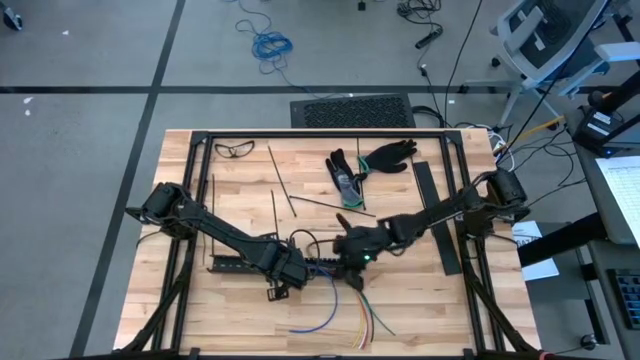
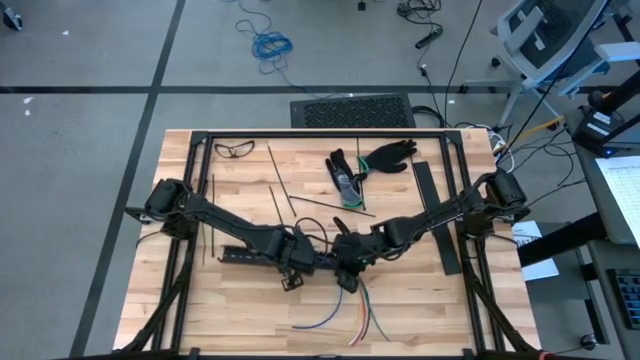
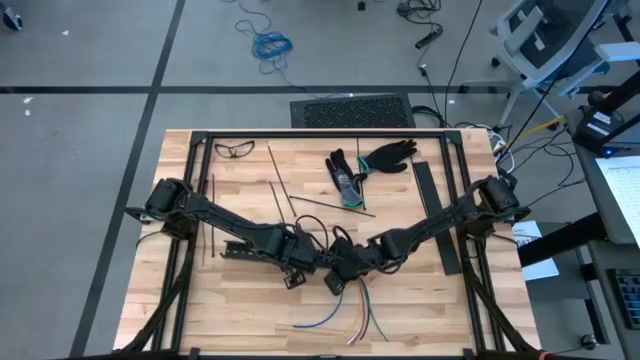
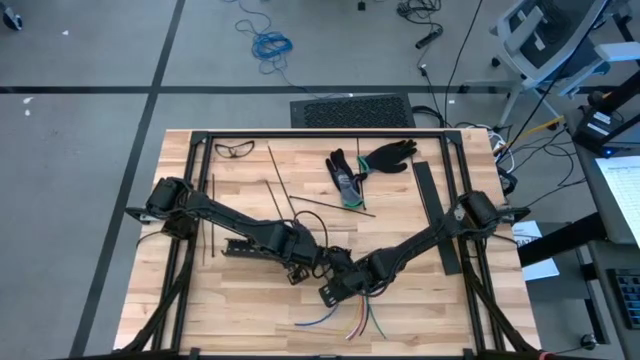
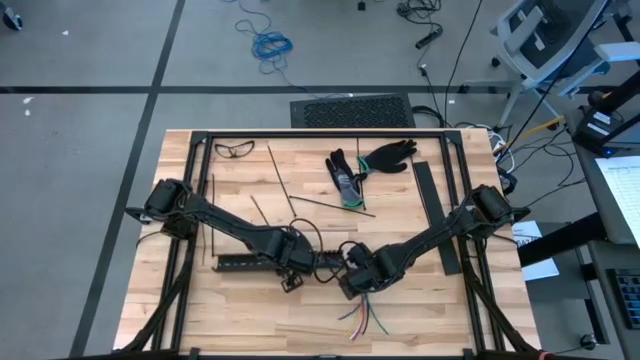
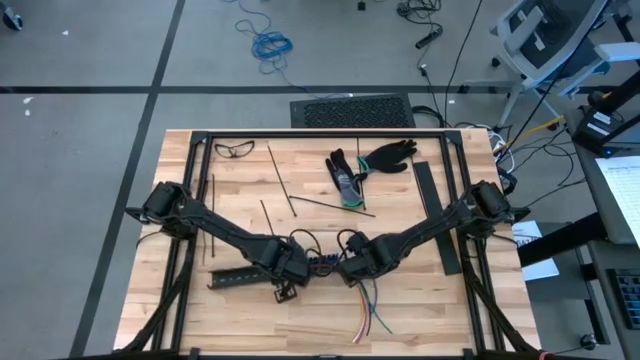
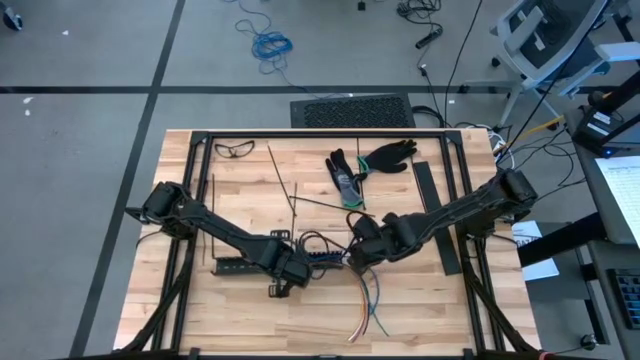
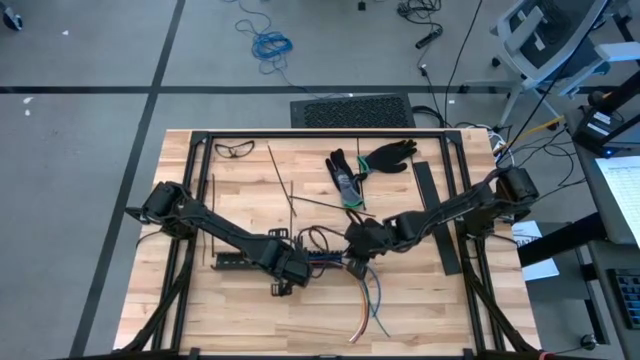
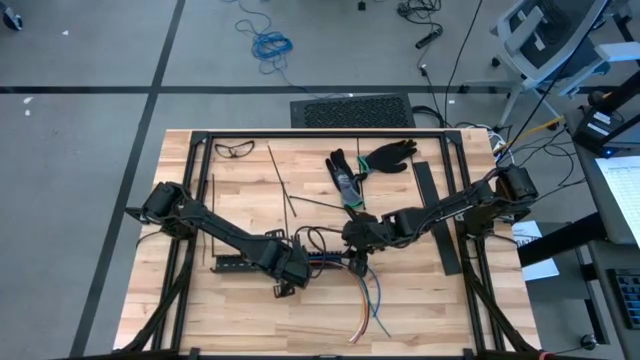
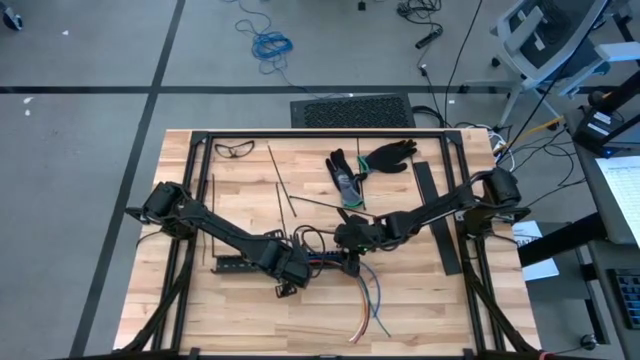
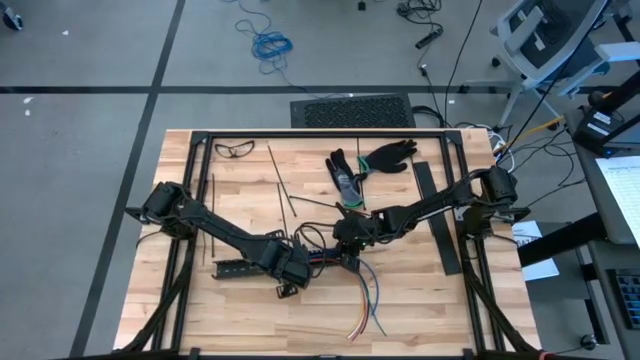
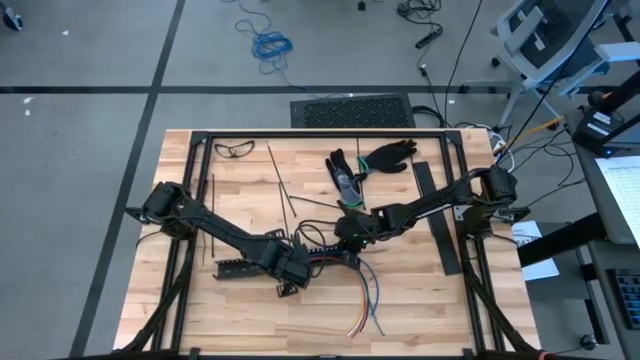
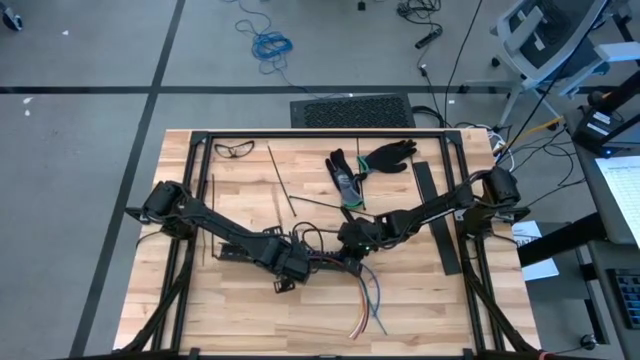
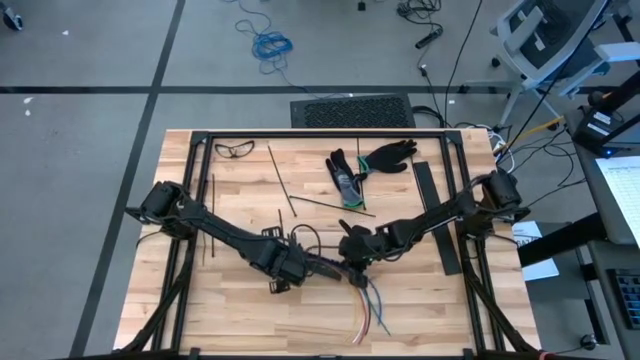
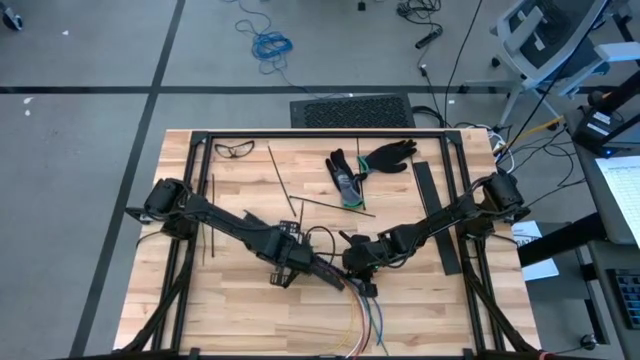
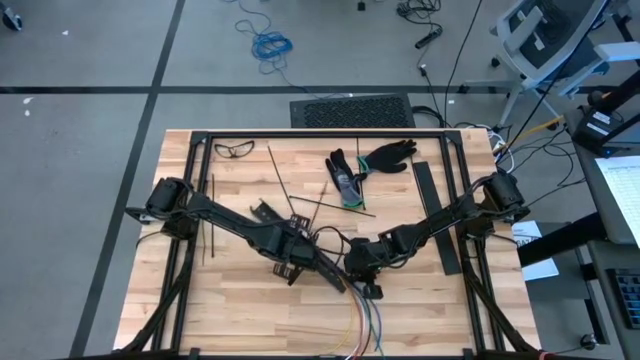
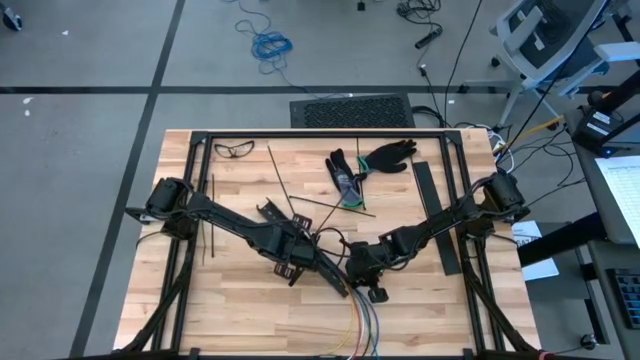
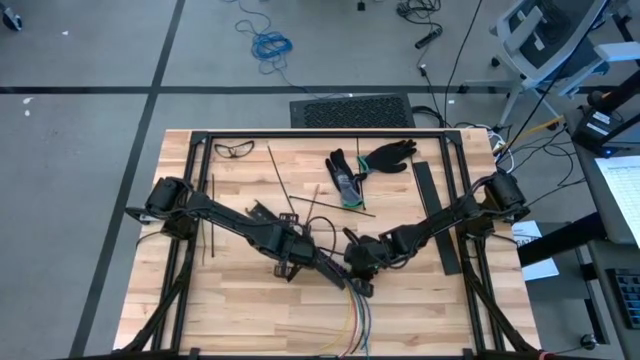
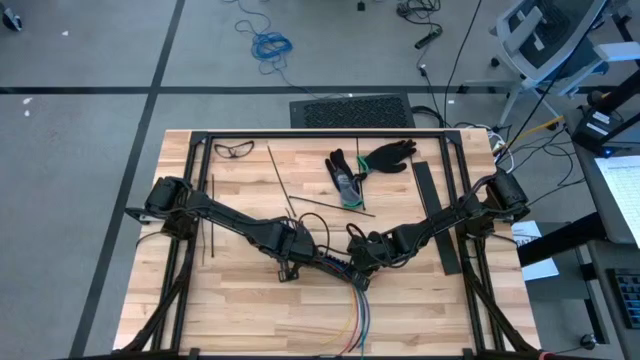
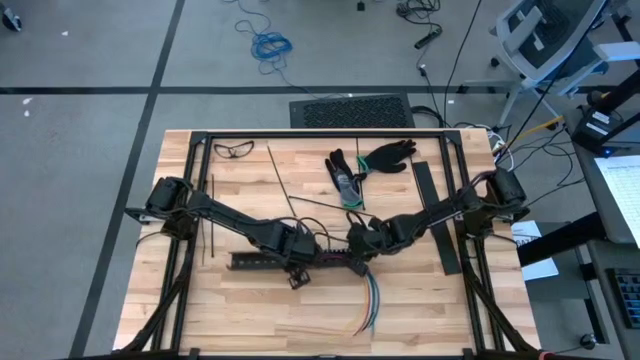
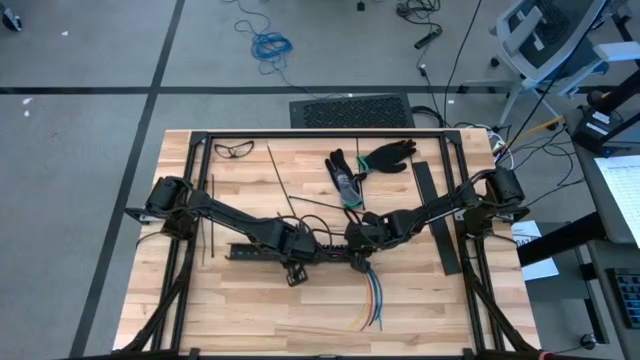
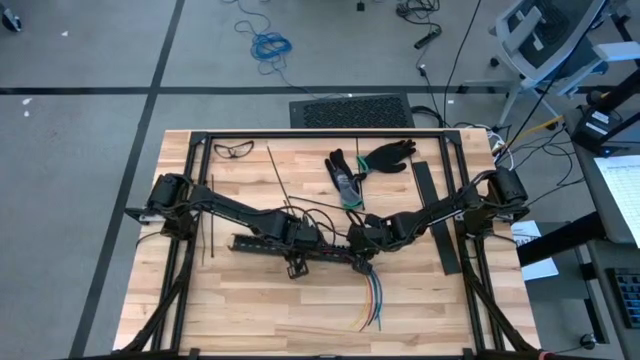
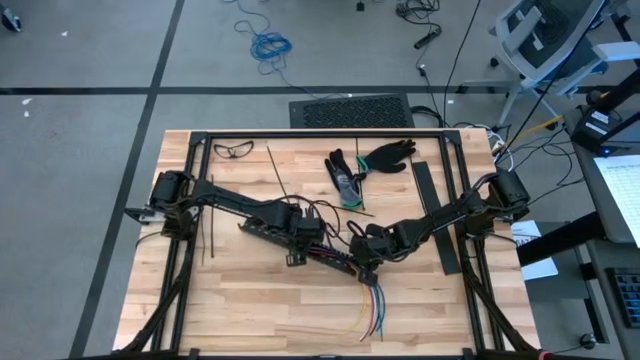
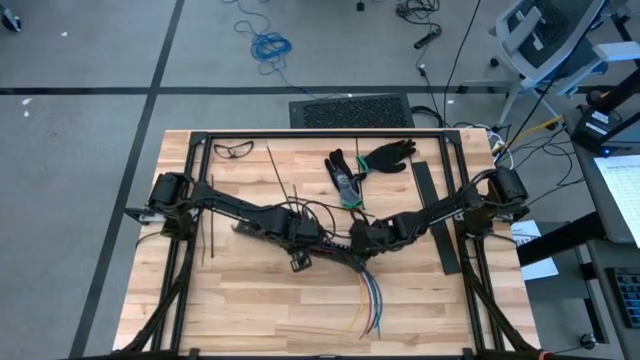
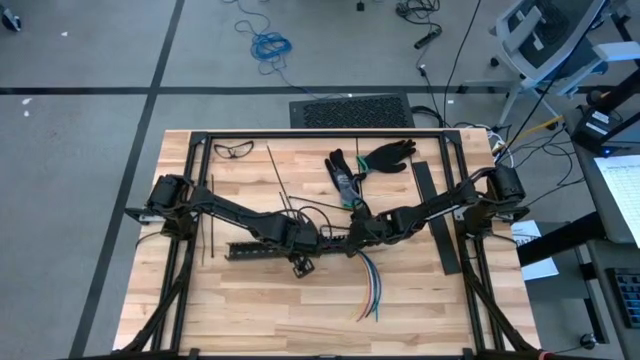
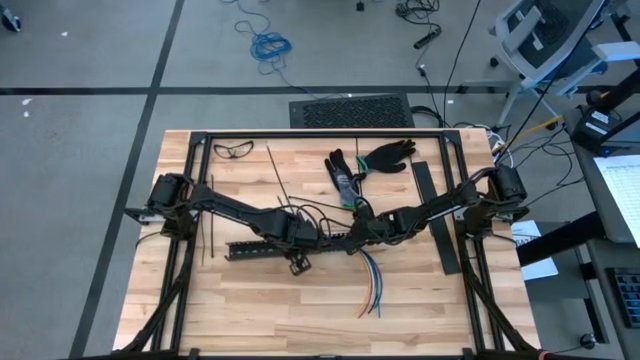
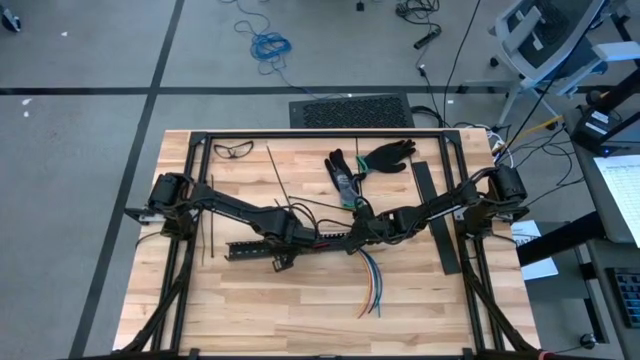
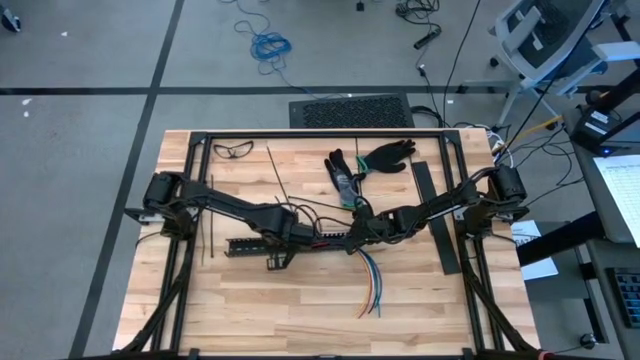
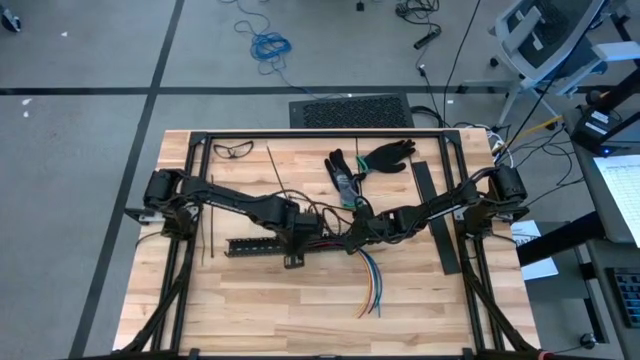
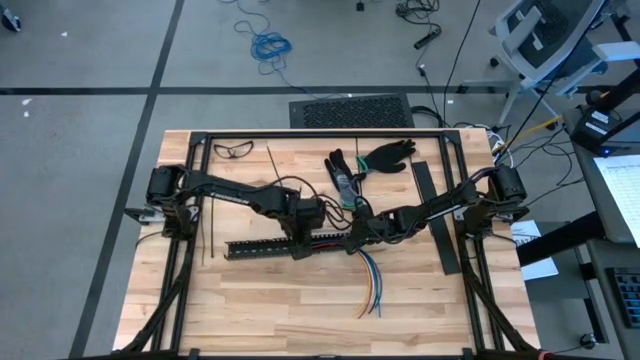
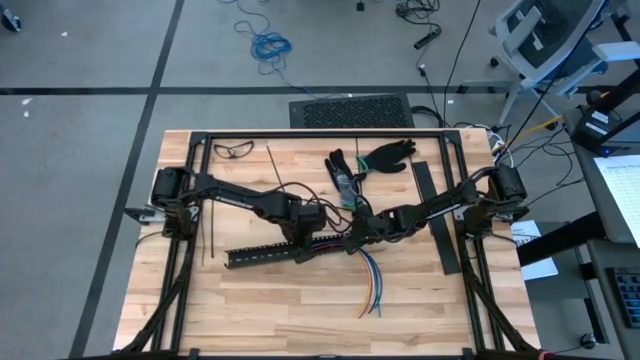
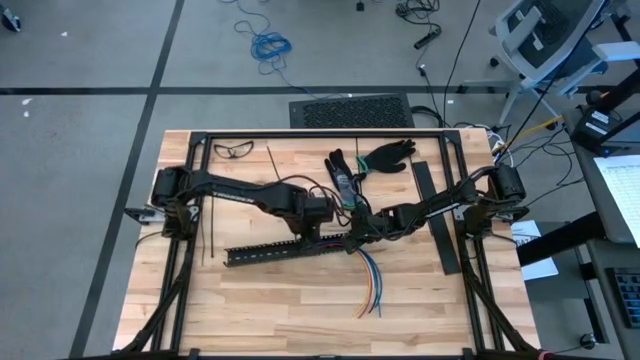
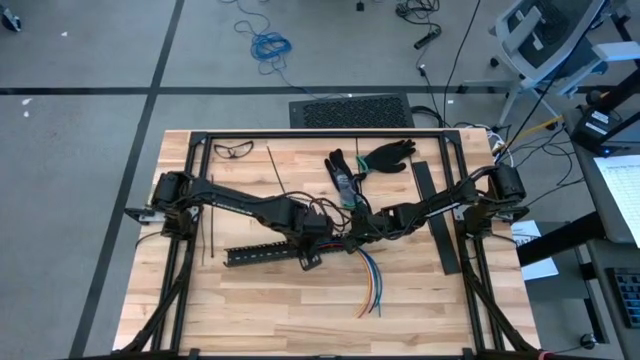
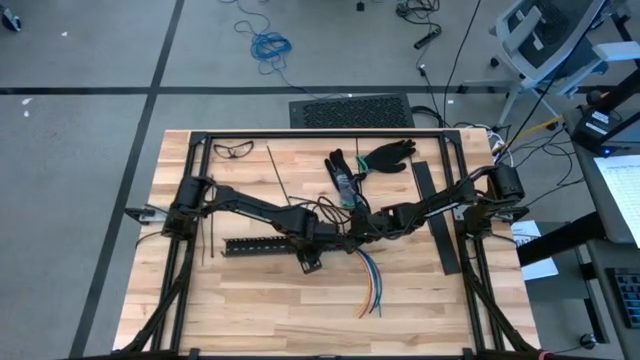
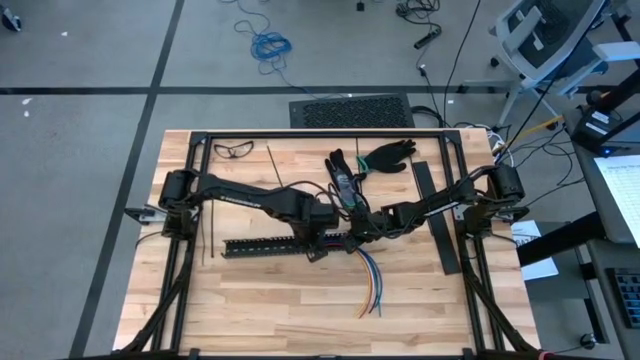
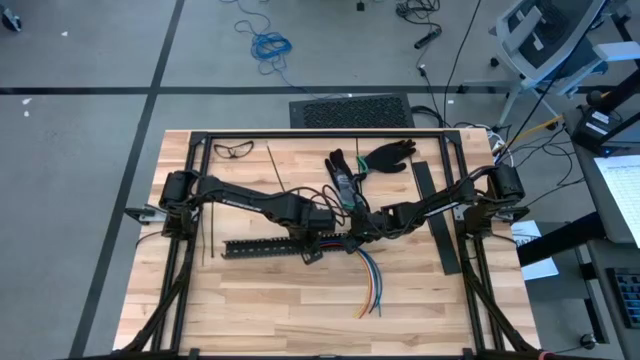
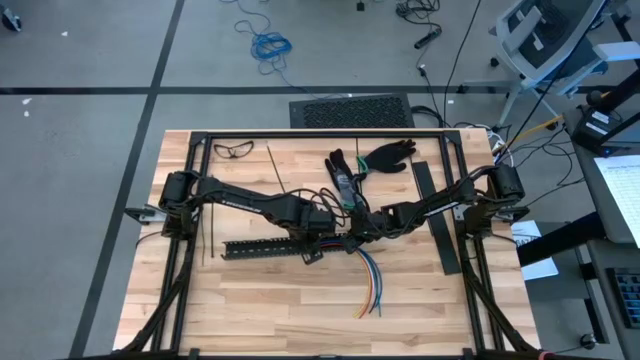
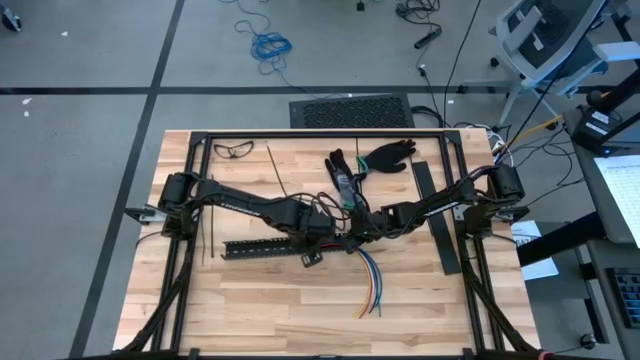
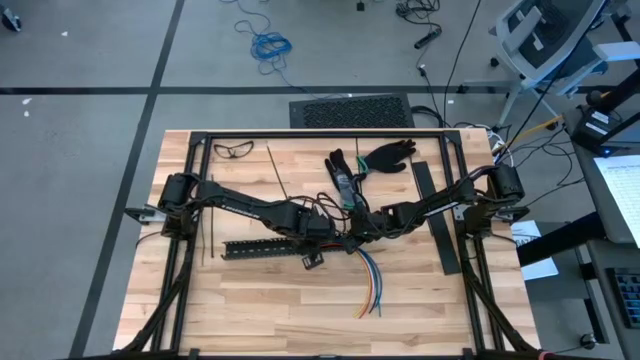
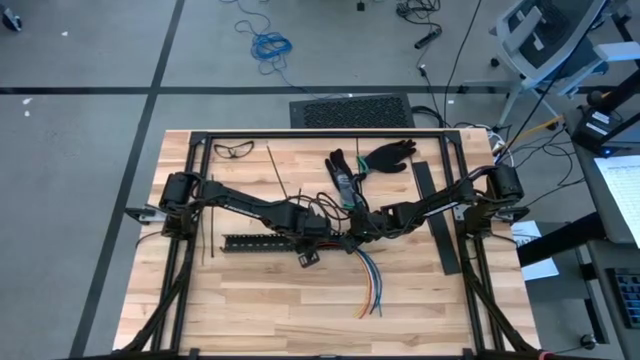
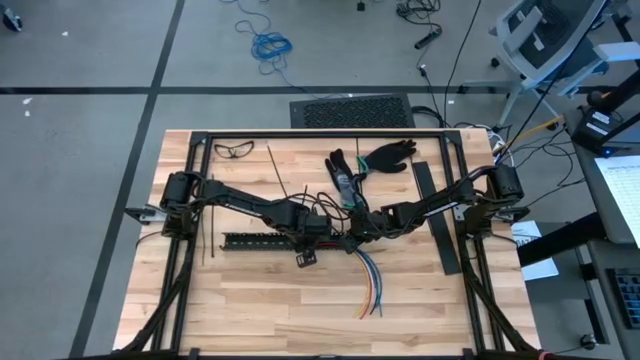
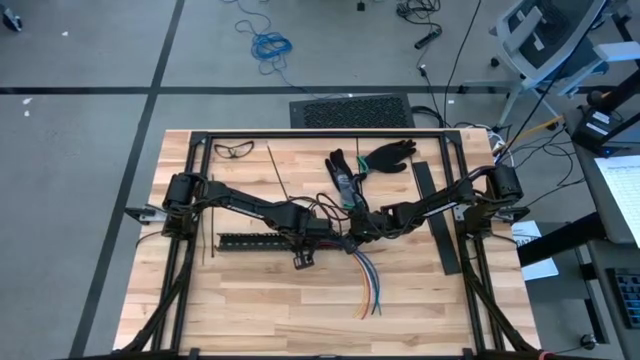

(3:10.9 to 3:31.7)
Task: Ziptie cables
Put the zip tied cable wires into the black cable duct
